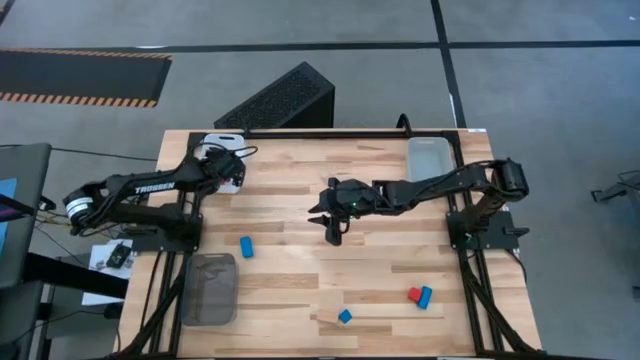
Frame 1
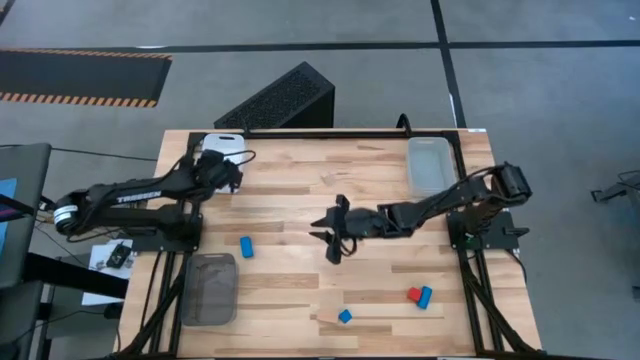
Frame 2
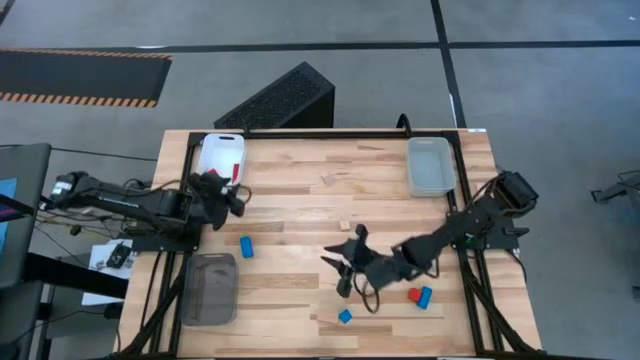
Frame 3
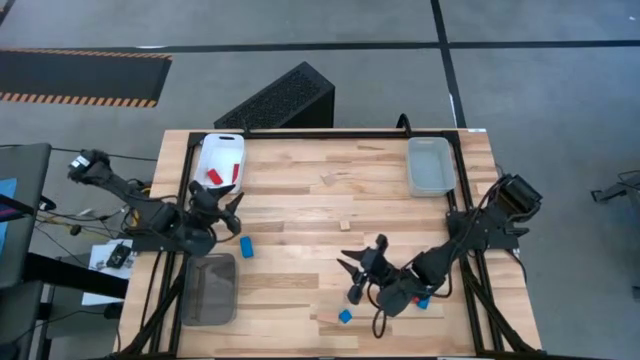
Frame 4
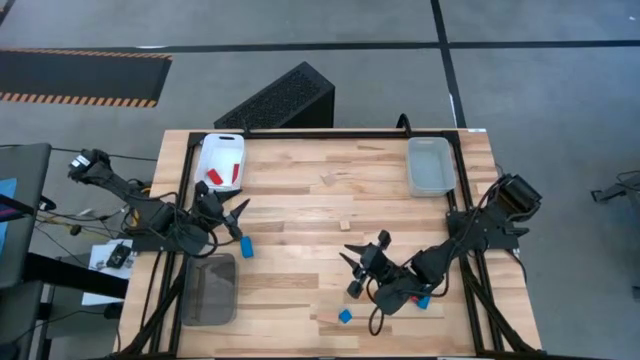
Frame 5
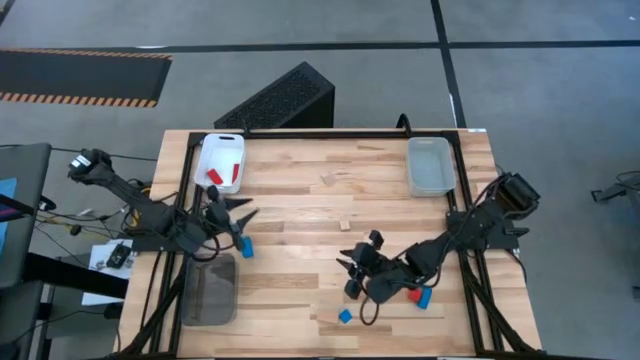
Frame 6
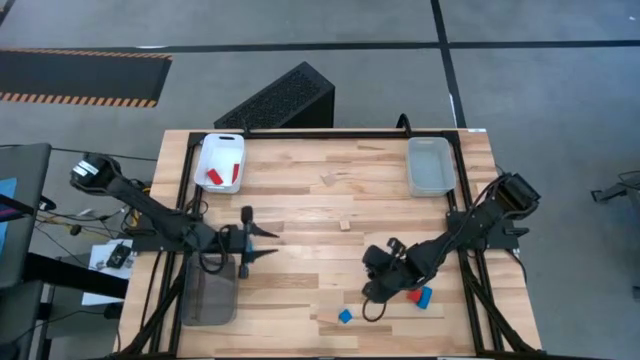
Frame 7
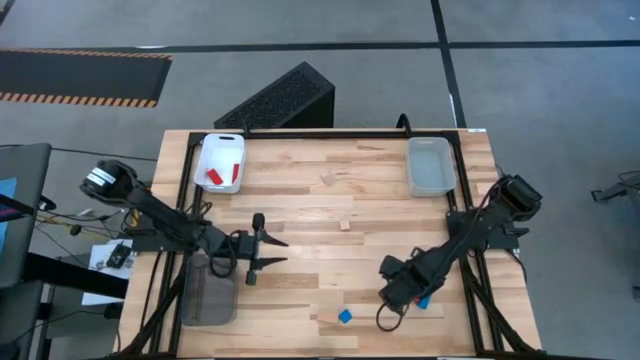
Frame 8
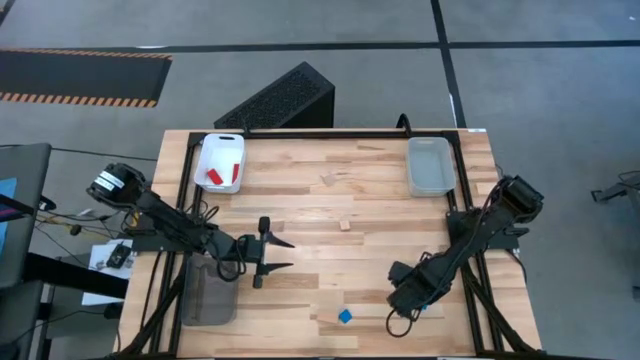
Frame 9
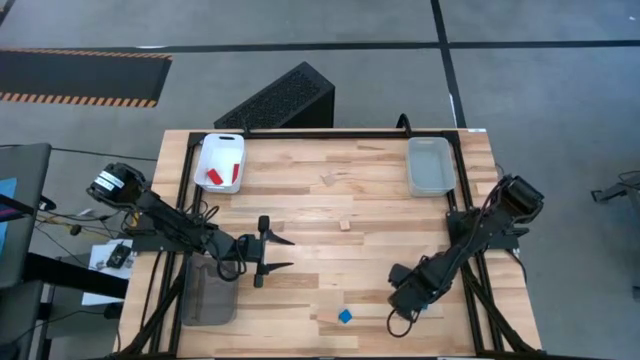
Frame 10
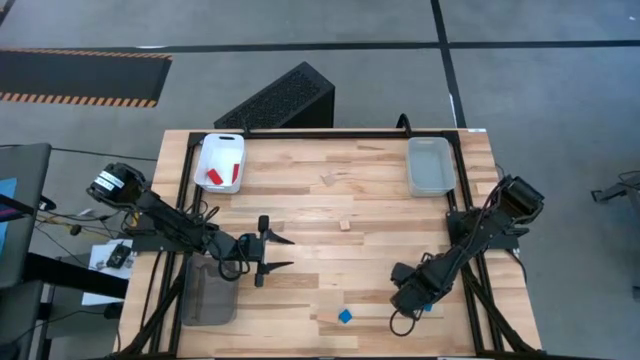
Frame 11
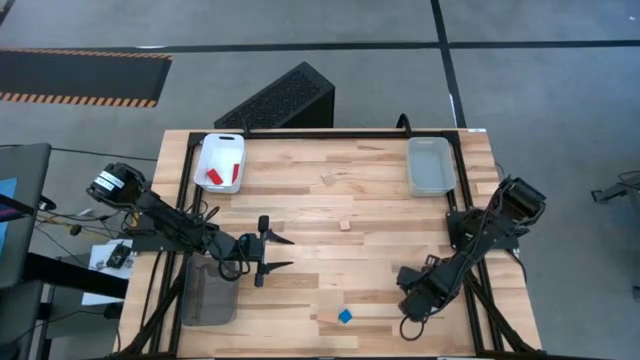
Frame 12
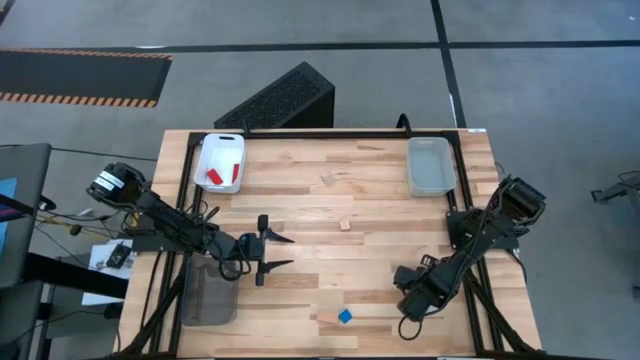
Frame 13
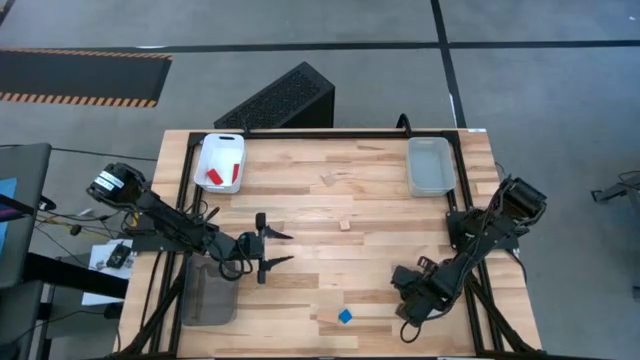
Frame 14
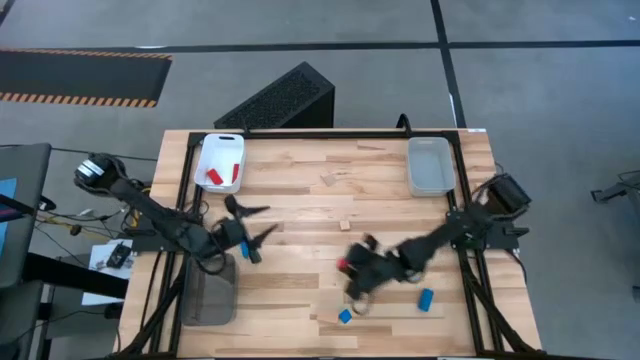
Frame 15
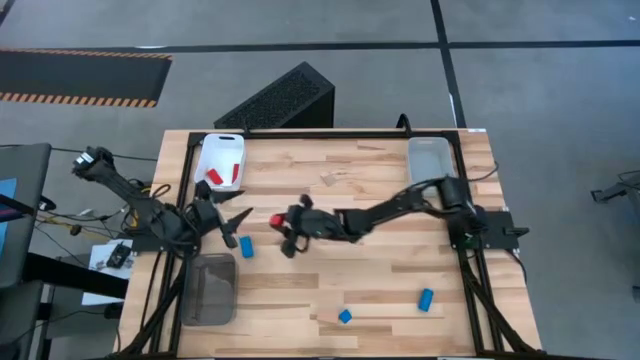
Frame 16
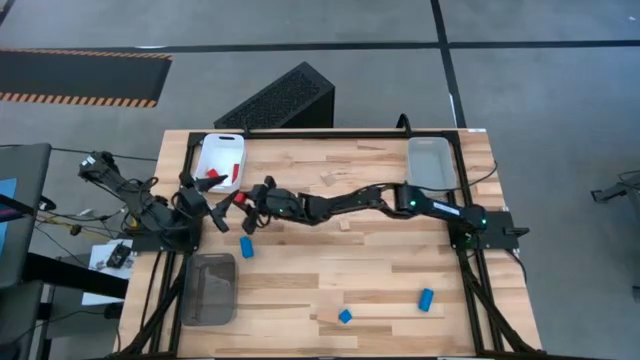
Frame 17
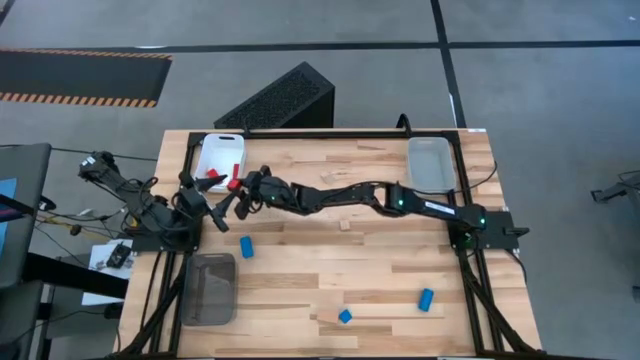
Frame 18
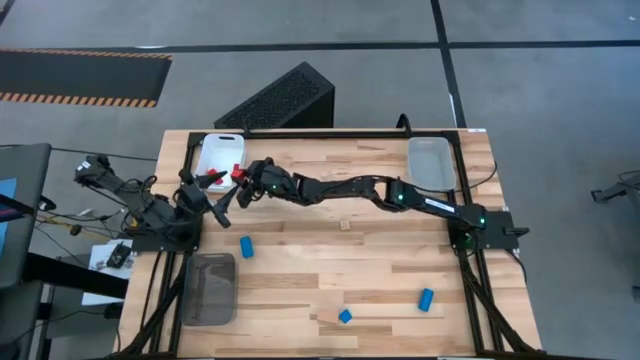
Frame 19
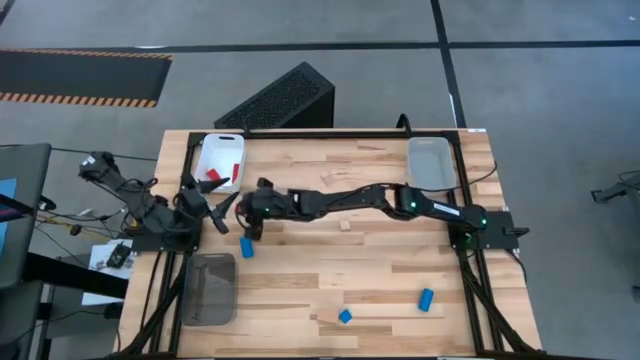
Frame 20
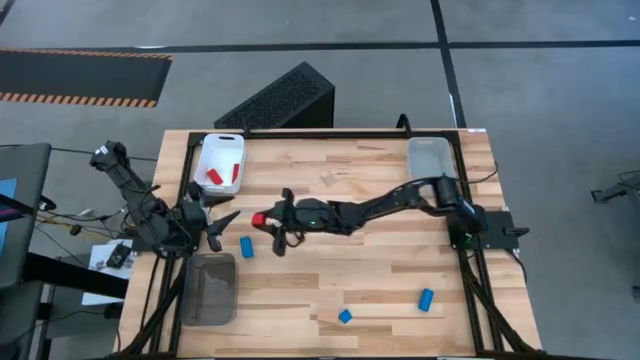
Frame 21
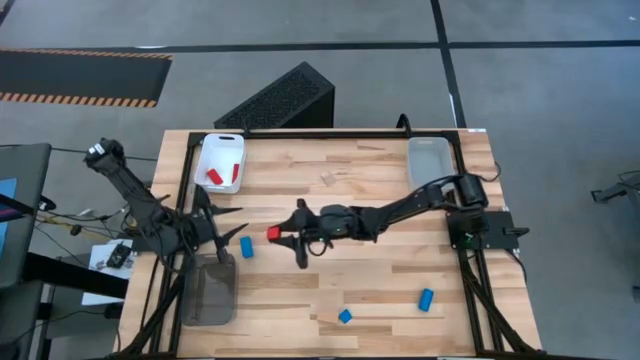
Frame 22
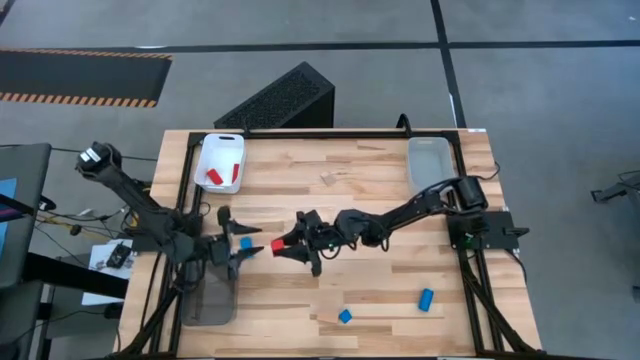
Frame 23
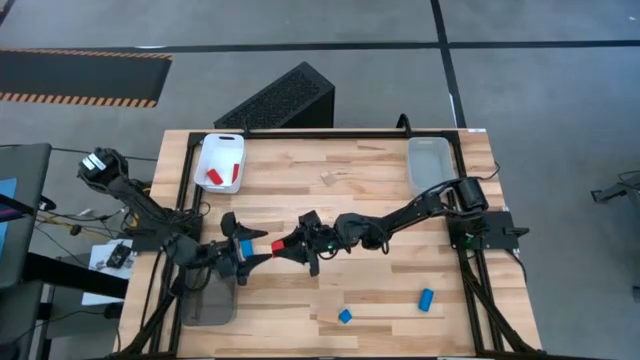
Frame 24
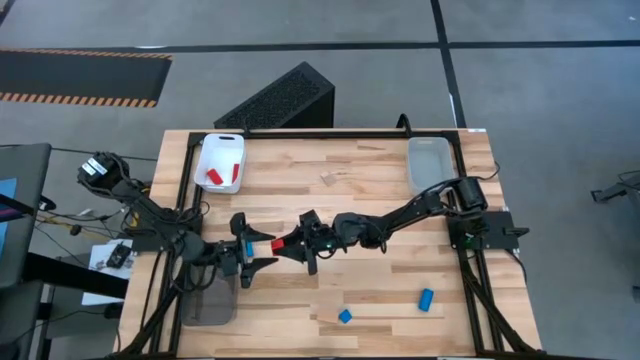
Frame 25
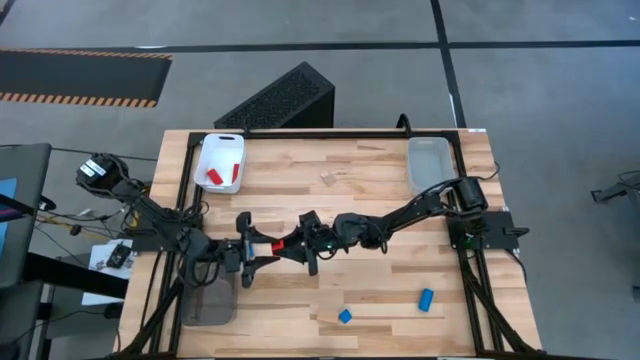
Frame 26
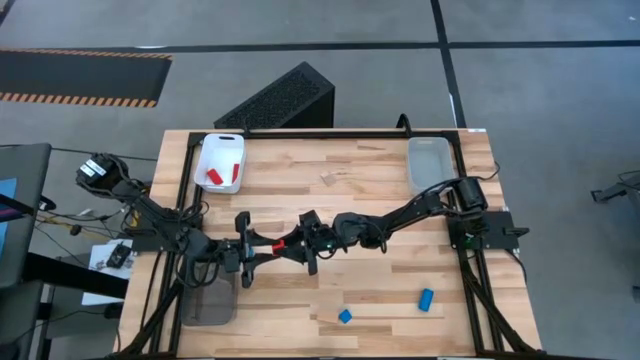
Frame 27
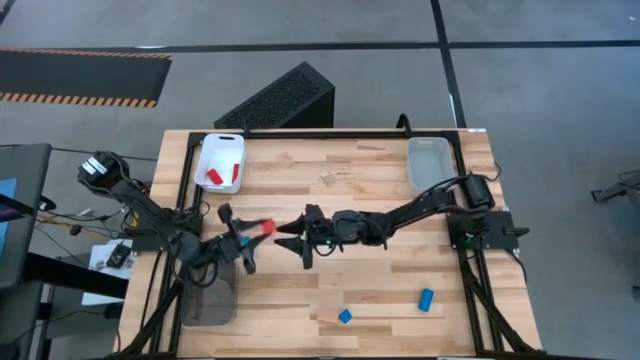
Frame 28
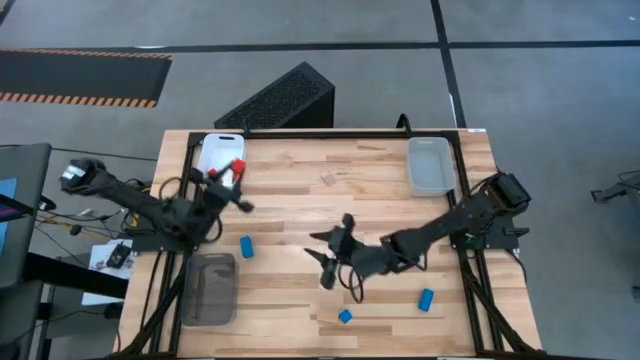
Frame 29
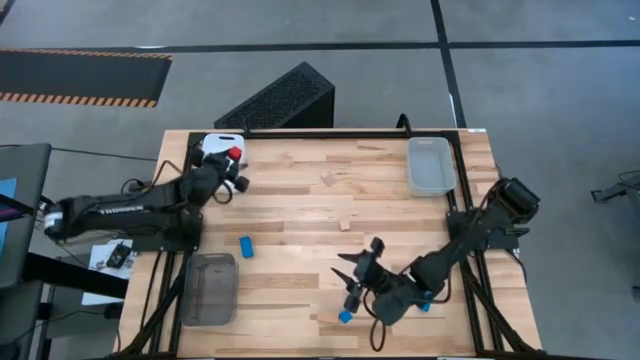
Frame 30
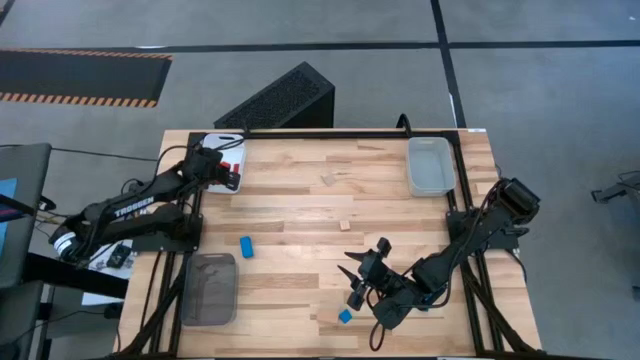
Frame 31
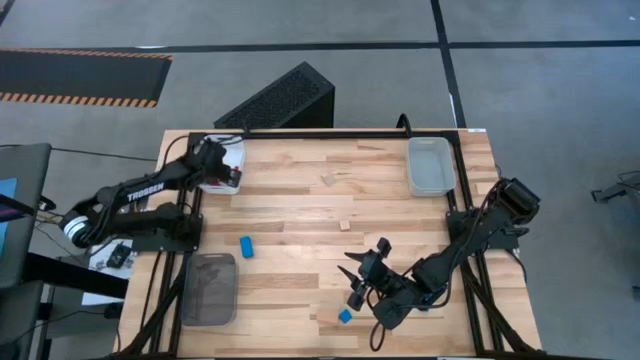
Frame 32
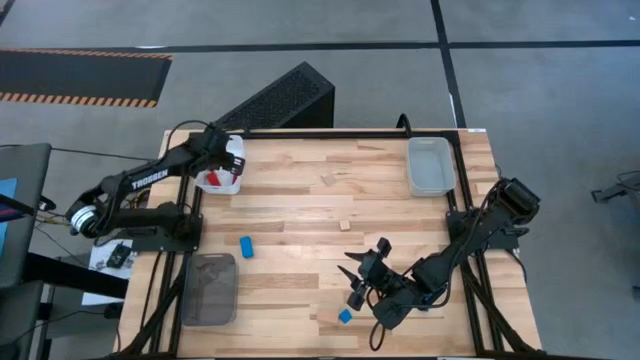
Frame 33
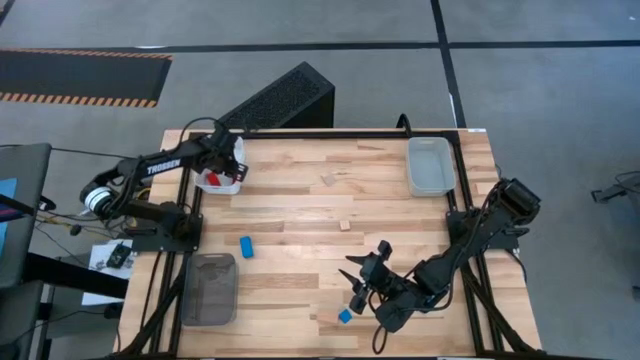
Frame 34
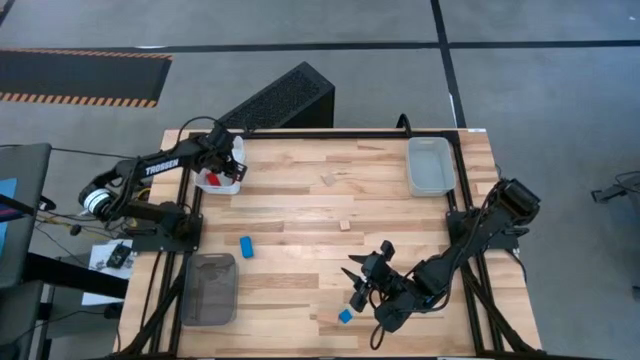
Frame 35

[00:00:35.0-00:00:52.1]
Task: Sort & place blocks by color
Put the red block into the white bin

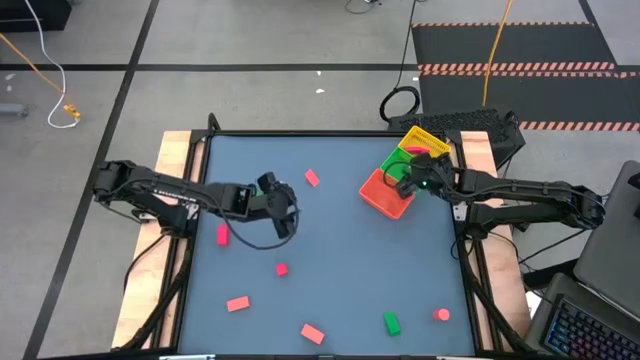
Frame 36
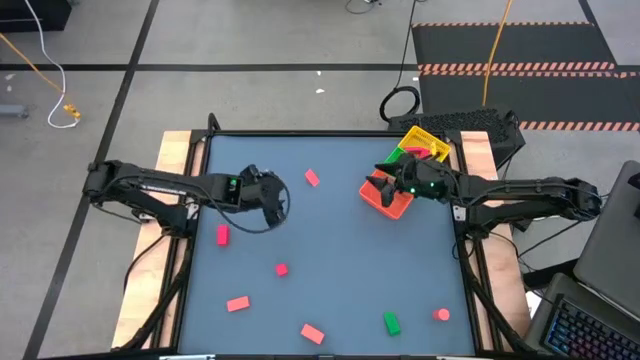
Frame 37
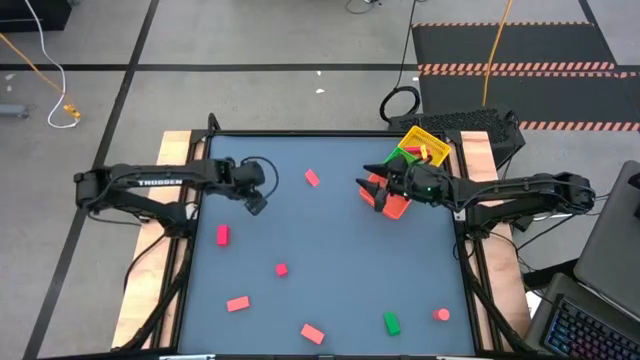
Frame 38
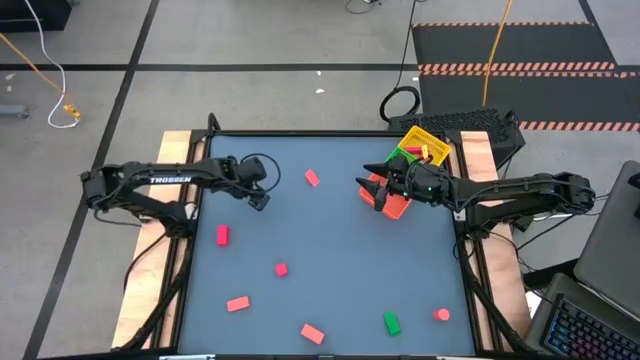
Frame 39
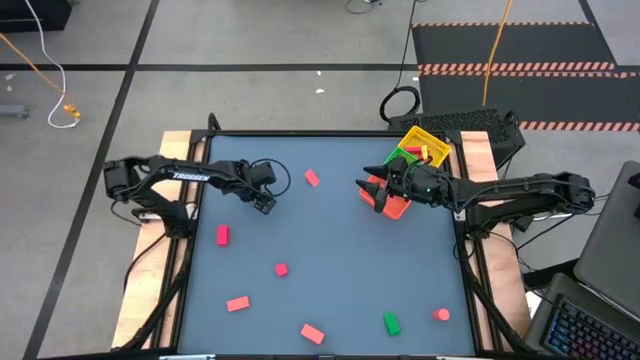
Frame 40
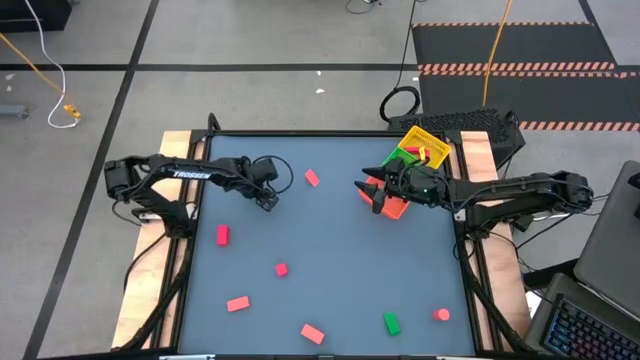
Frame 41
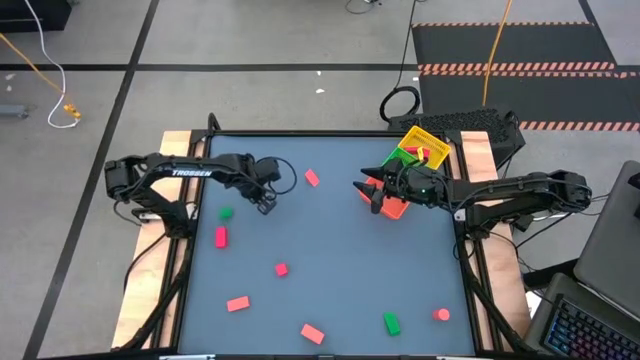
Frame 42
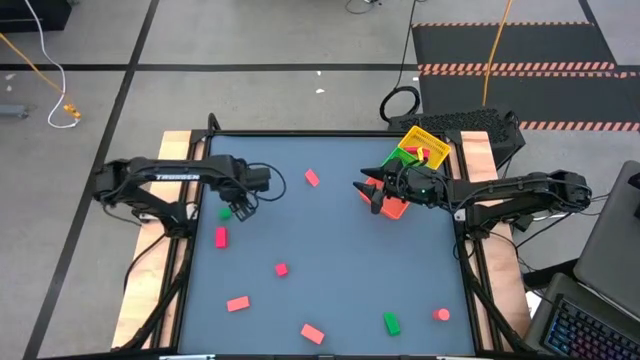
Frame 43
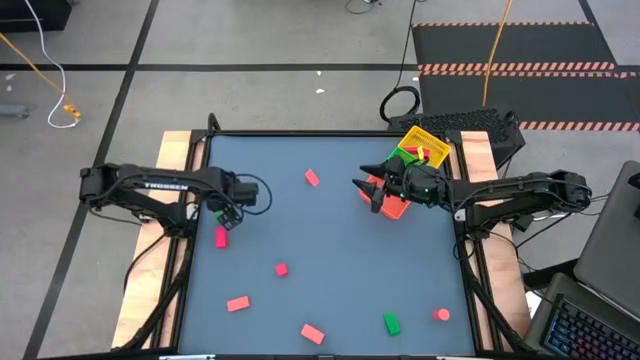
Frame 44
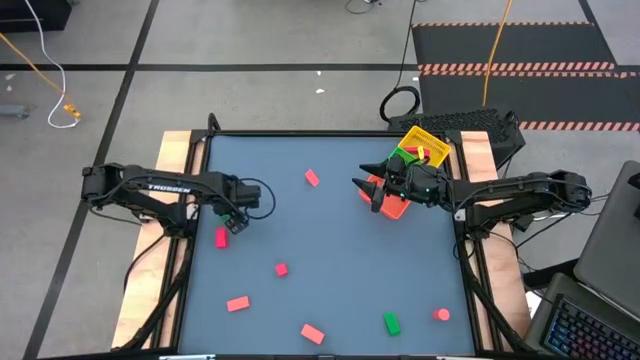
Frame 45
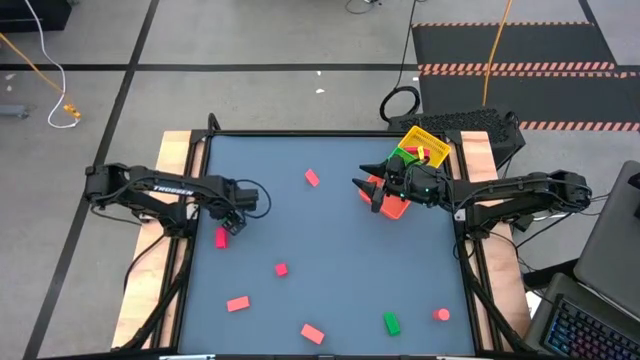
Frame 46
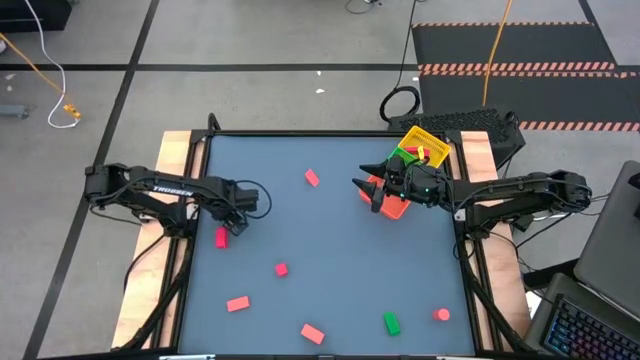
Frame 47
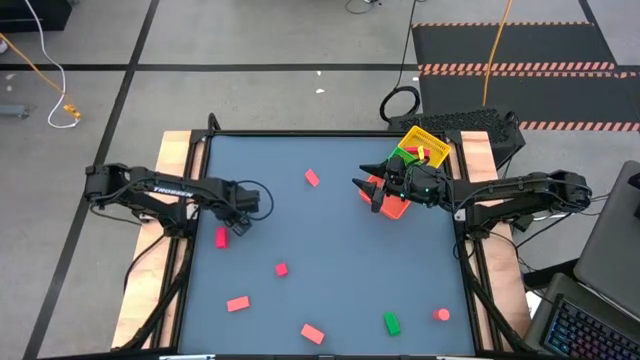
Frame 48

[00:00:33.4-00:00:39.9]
Task: Sort & place blocks by color
Put the green block into the green bin
